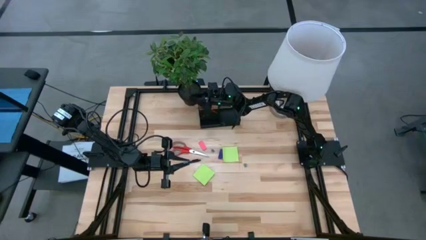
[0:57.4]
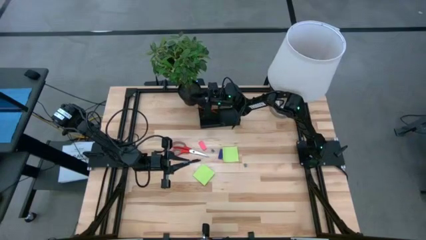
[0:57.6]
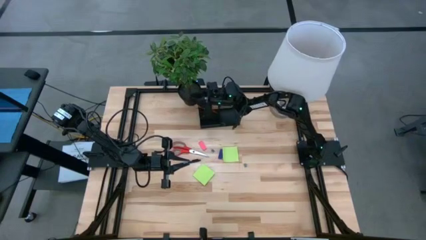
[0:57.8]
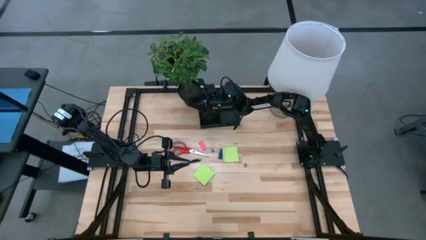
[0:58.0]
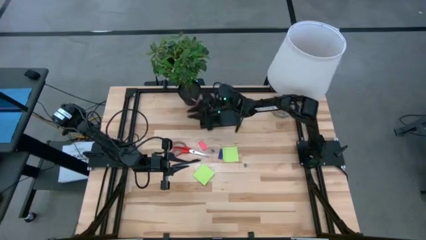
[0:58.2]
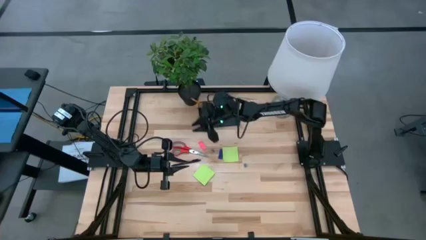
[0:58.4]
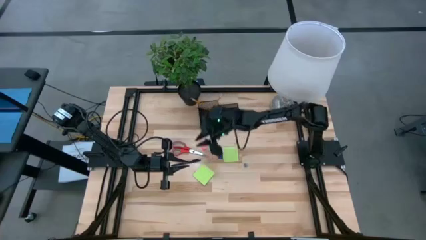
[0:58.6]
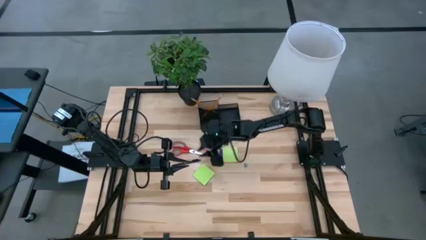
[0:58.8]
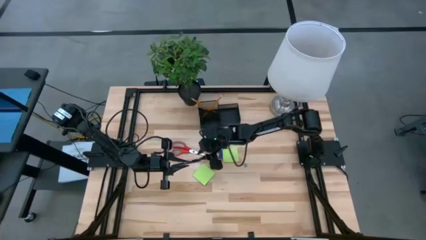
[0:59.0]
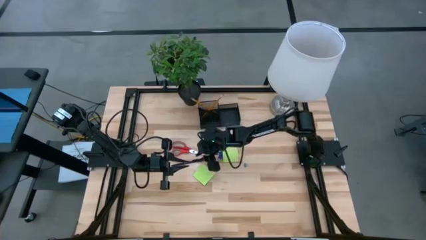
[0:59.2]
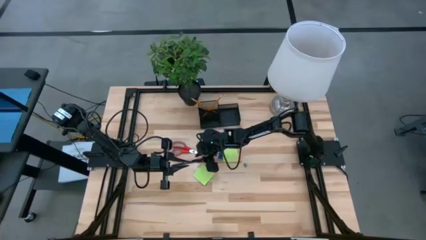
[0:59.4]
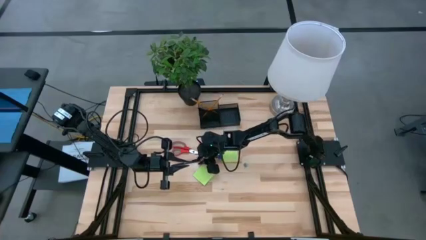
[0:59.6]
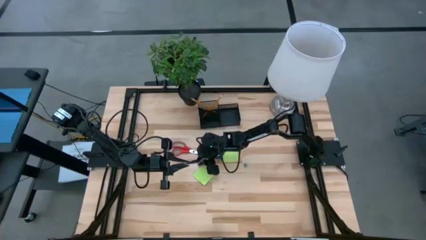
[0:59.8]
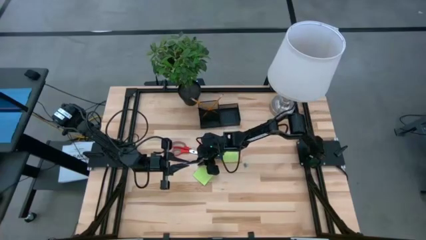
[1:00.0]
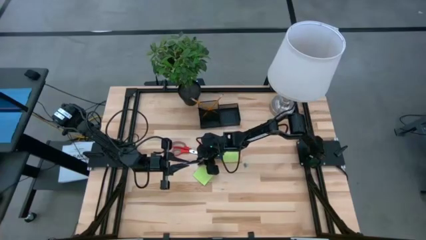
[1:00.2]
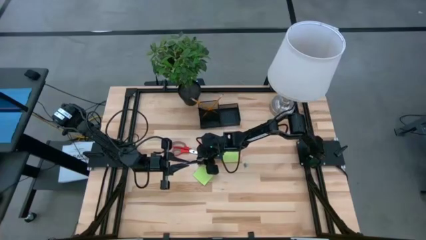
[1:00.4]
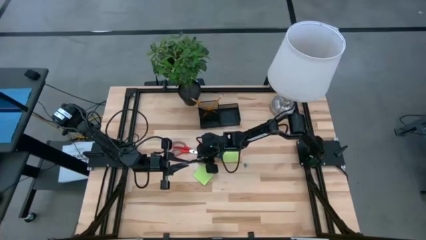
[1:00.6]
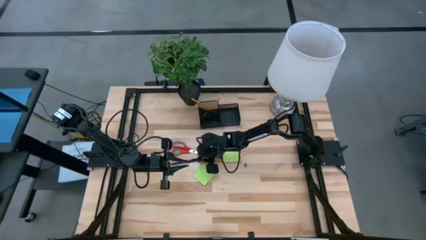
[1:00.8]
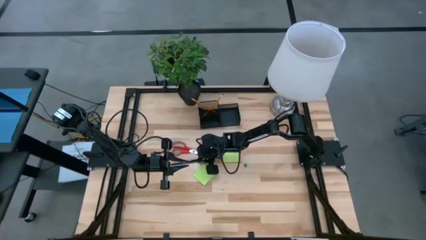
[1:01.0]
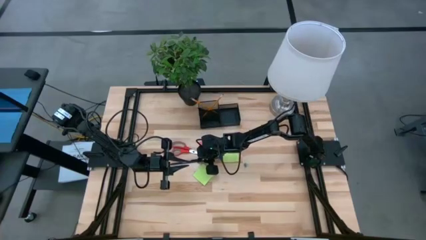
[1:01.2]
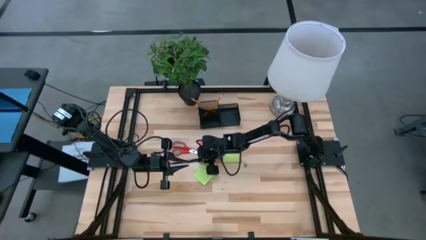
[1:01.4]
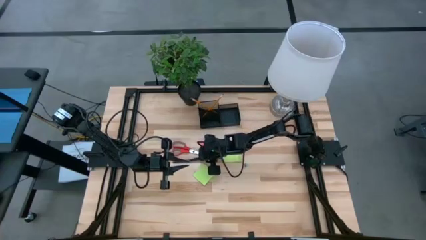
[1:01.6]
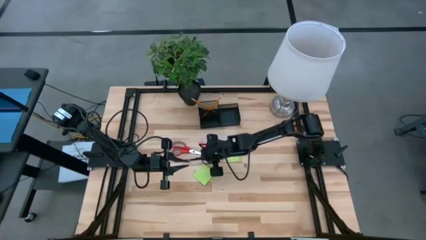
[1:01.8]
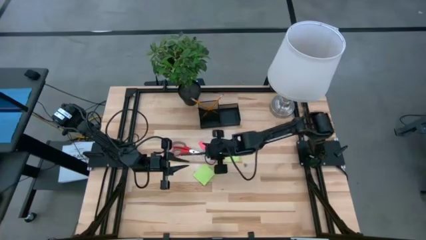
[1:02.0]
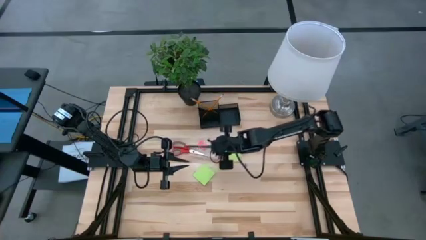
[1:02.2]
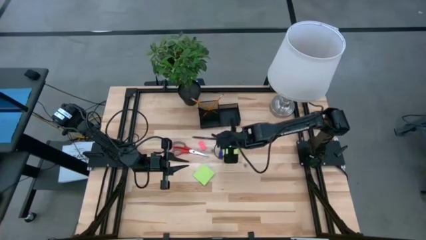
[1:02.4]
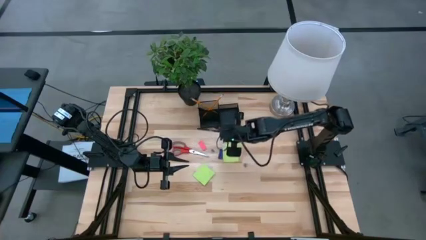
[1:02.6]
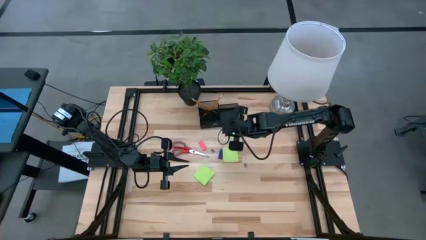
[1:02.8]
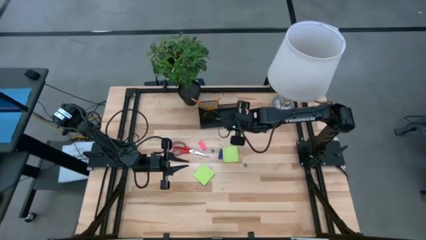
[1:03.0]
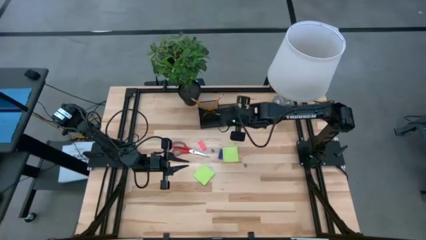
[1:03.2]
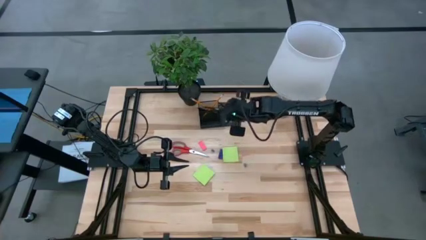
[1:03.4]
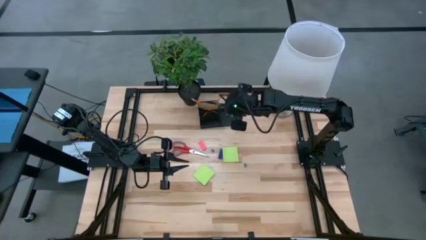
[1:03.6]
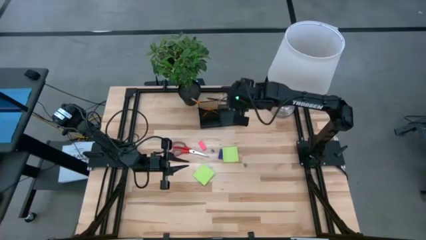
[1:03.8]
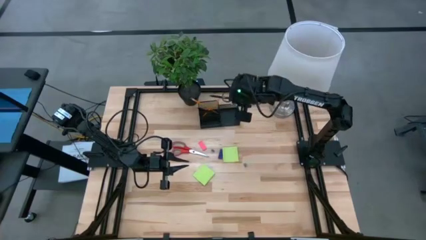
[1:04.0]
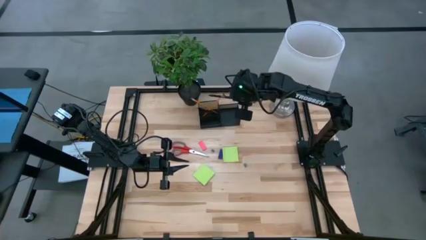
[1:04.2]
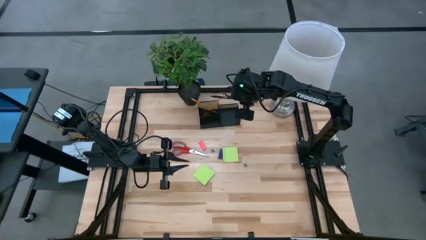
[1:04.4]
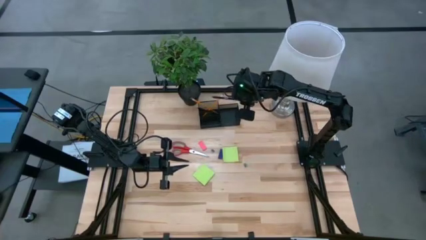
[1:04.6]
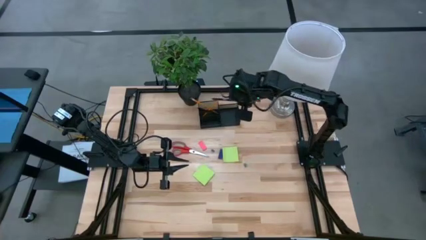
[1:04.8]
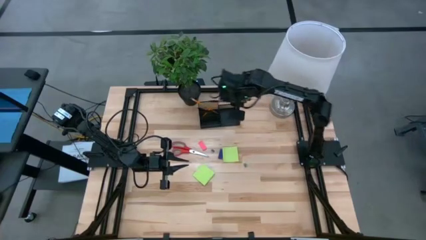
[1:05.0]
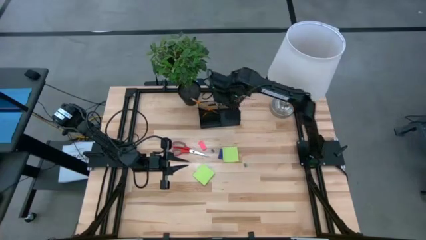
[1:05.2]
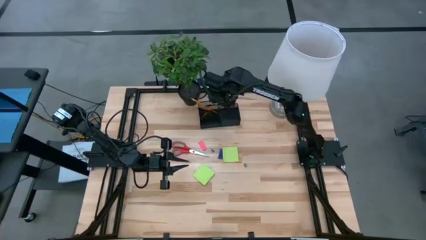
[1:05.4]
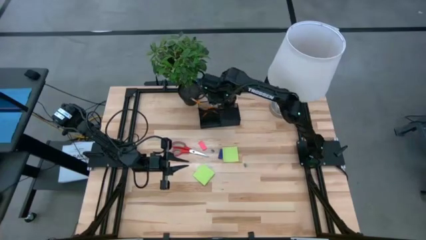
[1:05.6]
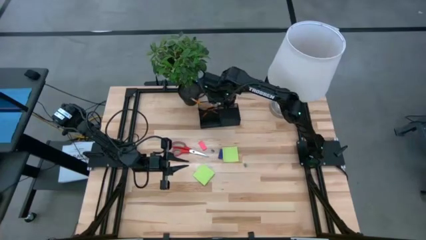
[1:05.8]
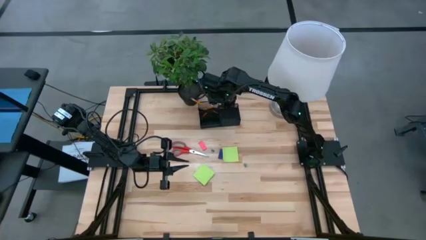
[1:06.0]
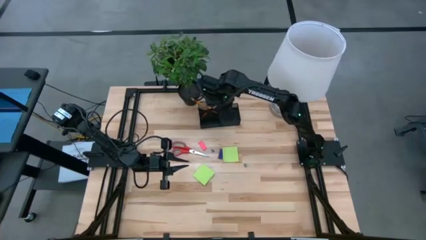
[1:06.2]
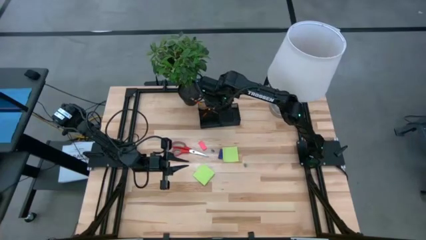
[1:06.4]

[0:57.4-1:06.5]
Task: Pick and place office supplies into organizer
Put the black ballpen into the desk organizer

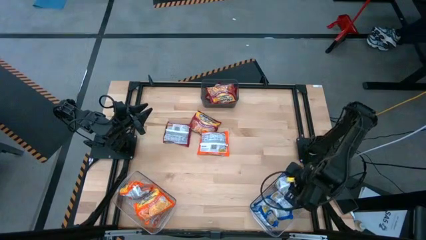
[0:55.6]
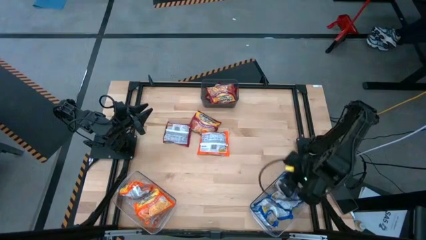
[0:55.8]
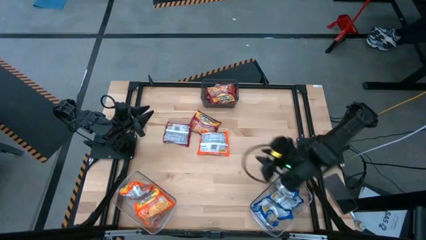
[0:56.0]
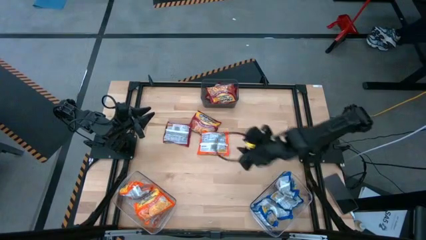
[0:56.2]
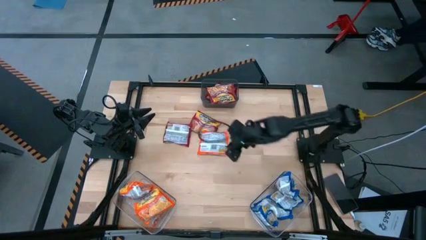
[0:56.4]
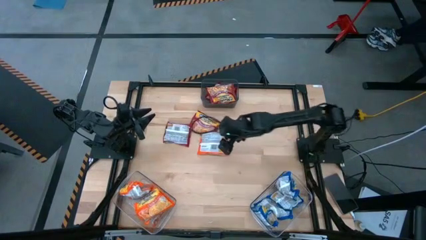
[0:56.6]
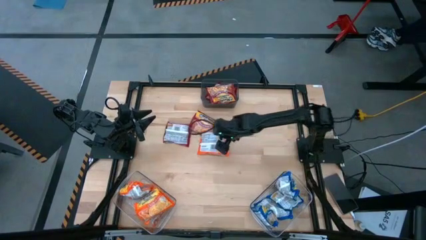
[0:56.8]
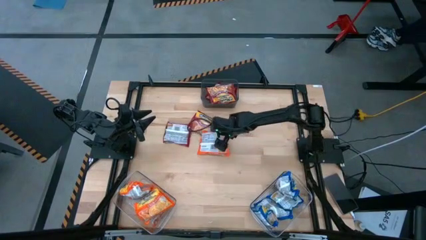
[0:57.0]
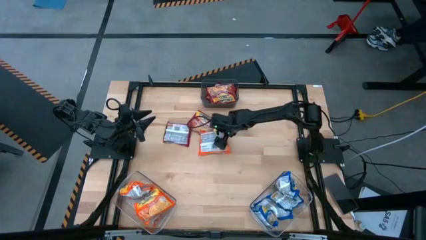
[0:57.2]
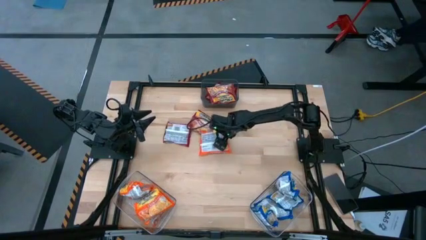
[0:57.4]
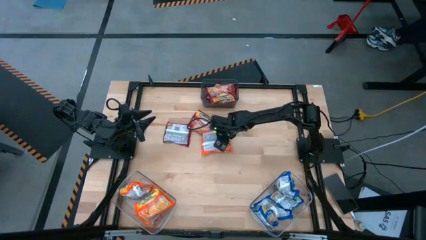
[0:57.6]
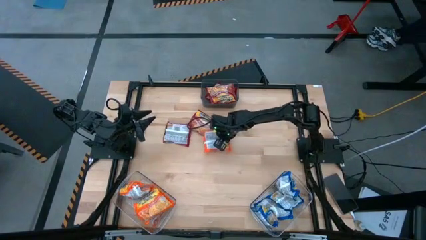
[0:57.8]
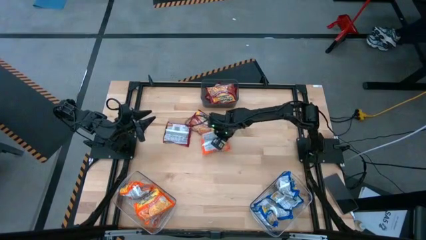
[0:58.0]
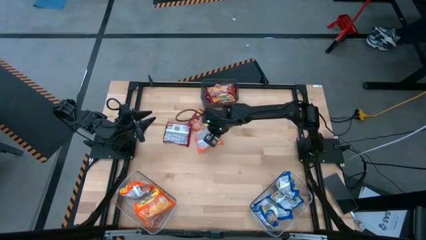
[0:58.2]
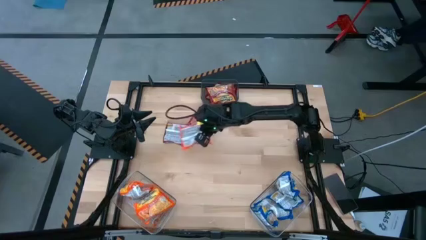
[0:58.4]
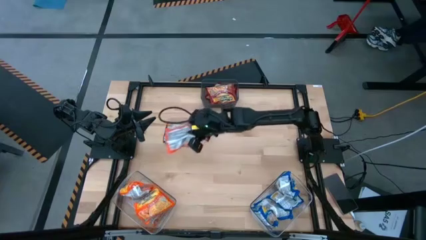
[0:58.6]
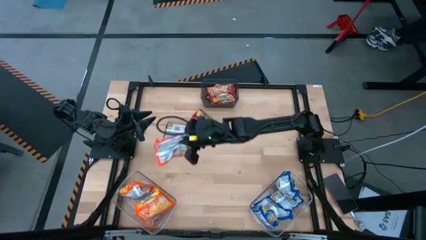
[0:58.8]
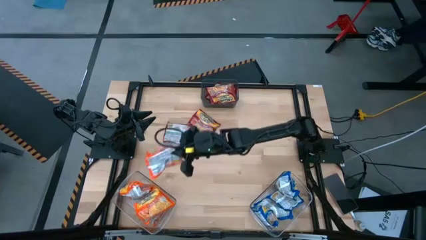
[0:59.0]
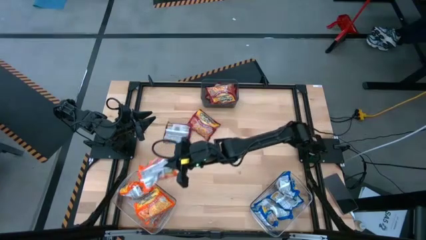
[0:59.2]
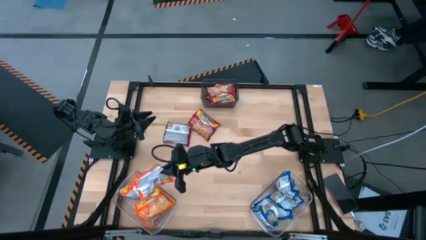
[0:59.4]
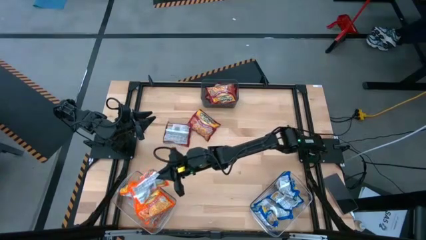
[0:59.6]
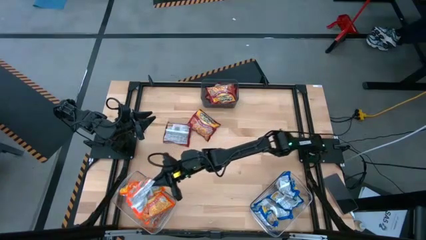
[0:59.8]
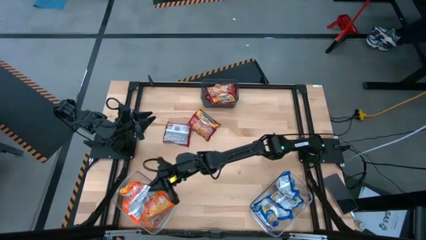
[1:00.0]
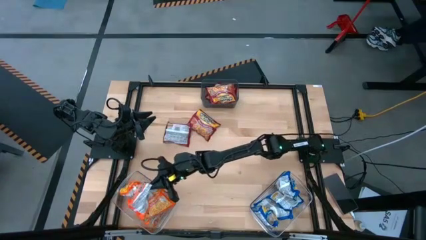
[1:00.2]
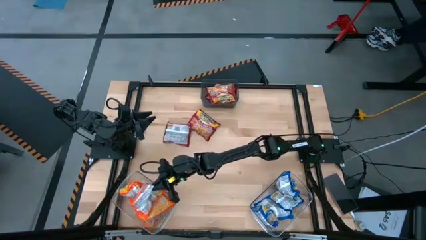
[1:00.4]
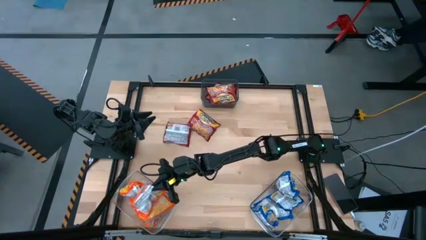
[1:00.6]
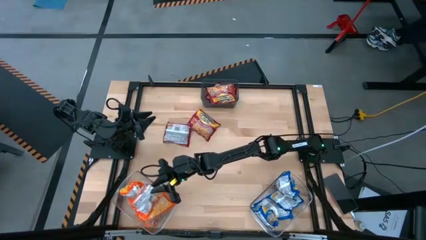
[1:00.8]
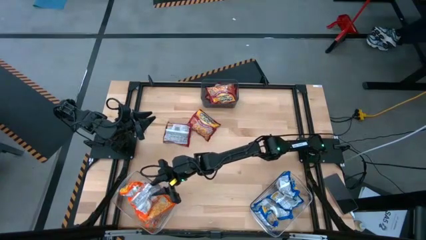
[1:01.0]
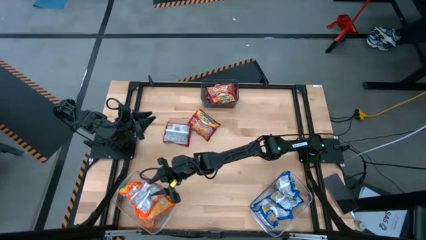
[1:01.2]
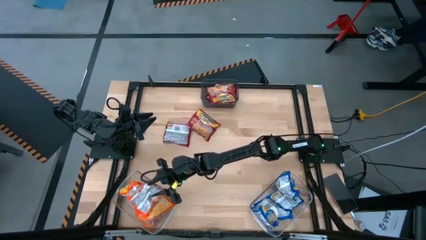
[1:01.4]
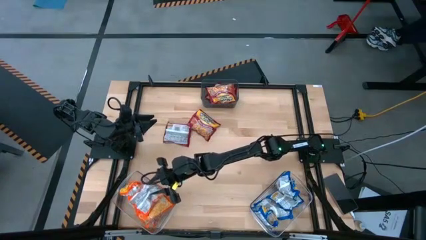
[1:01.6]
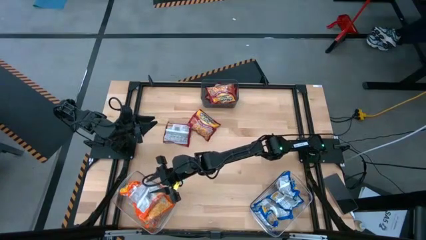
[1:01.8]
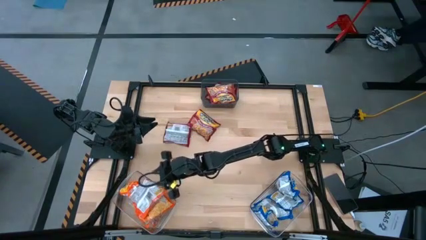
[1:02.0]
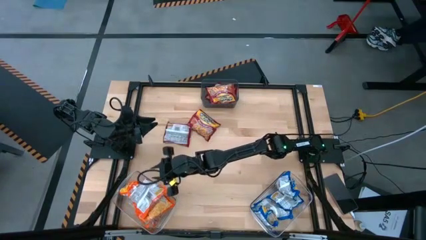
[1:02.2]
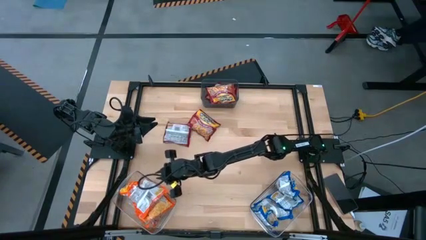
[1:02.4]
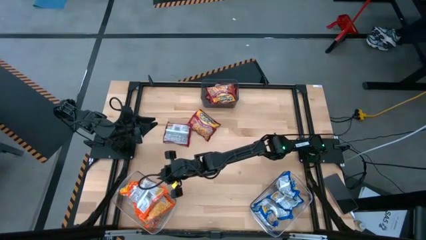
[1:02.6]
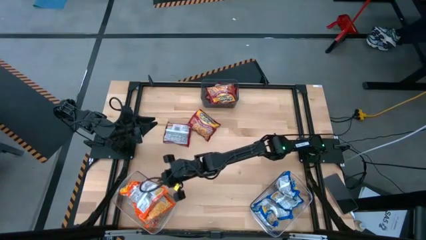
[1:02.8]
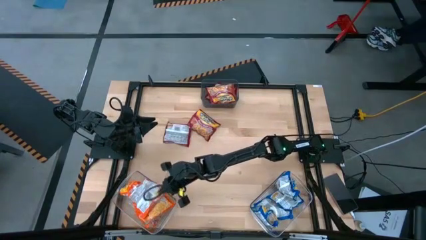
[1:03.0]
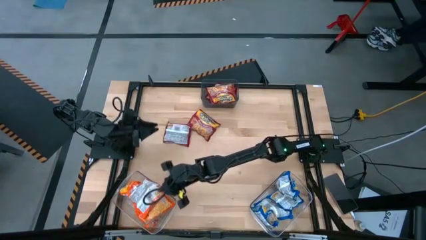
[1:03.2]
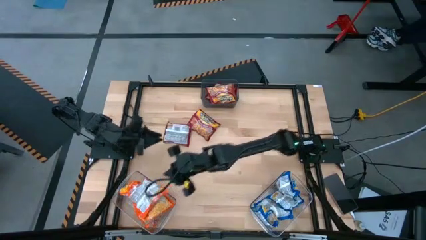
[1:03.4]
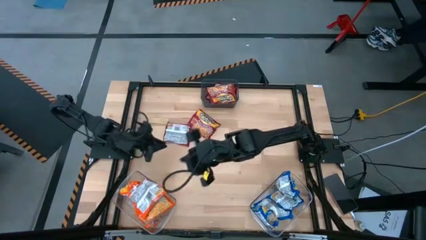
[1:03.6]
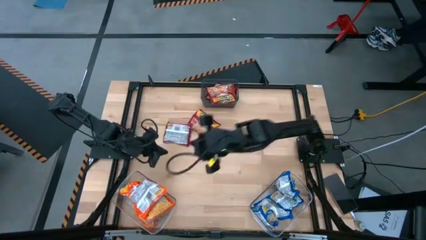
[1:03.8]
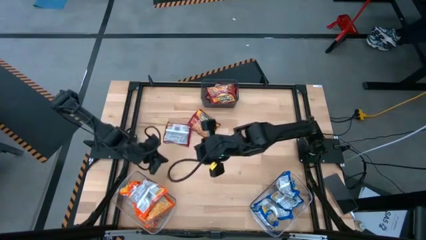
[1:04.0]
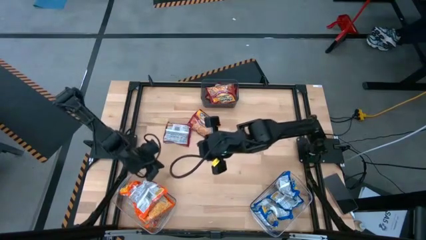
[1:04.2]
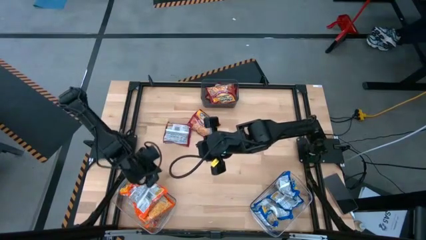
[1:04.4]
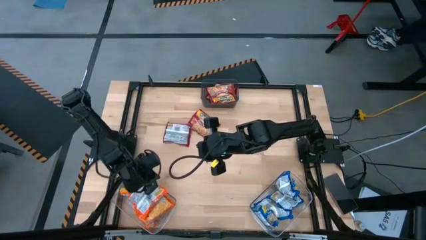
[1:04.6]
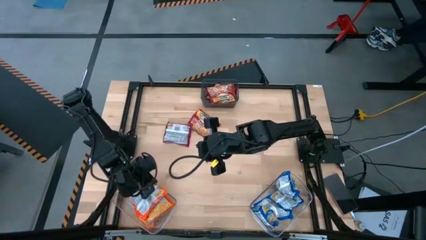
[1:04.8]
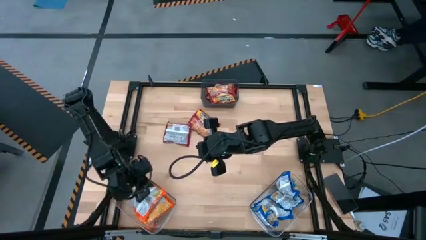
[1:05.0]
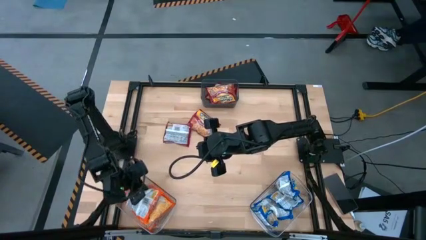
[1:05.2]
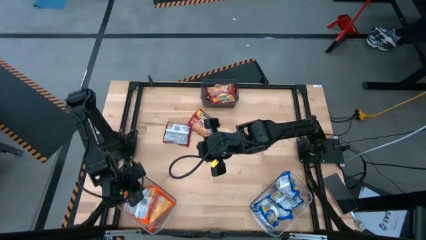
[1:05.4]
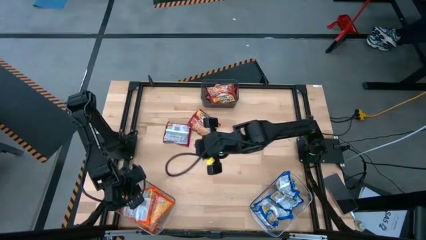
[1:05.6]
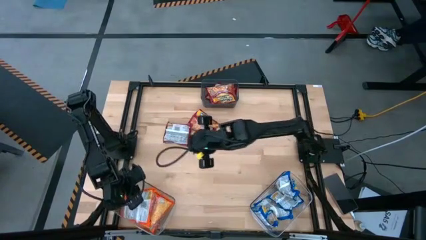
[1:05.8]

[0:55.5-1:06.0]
Task: Sort Maruchan noodles
Put the orange noodle pack into the left transparent bin
